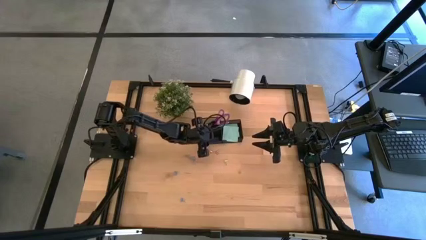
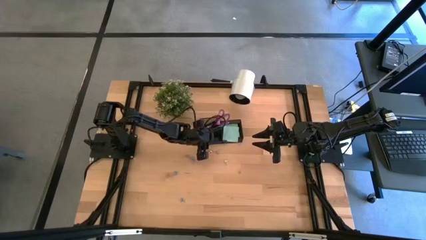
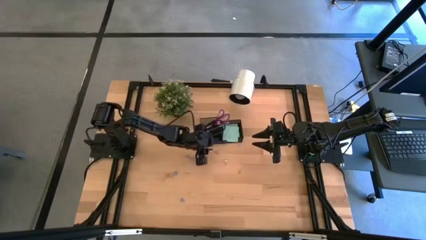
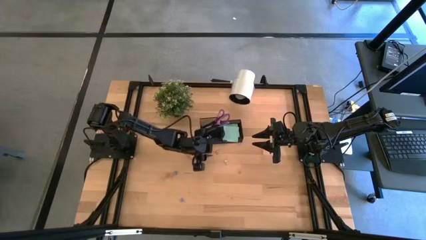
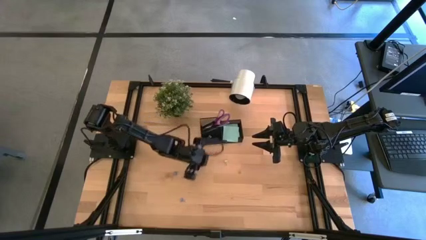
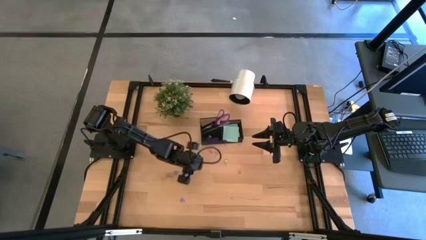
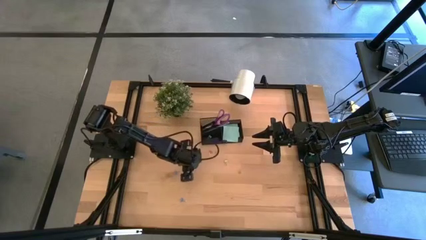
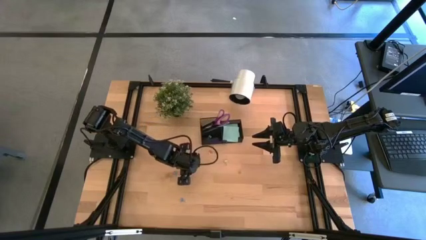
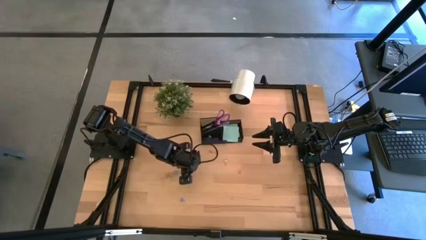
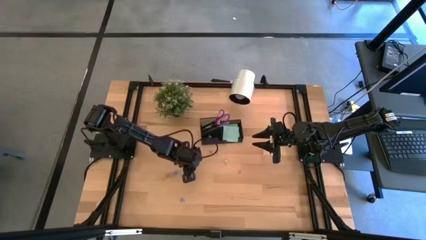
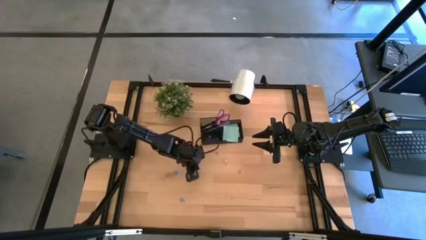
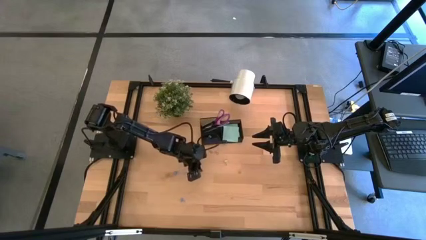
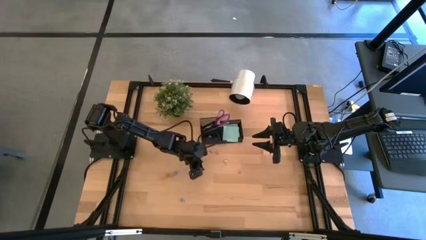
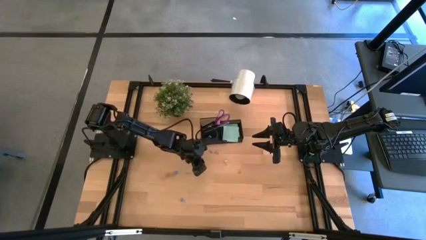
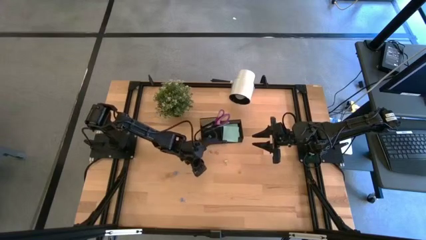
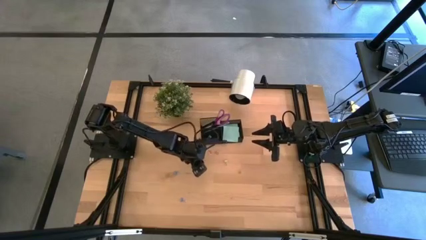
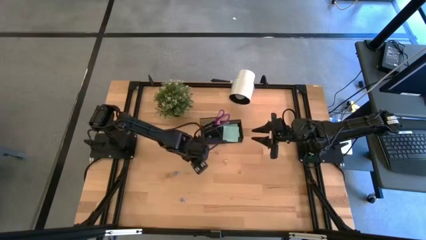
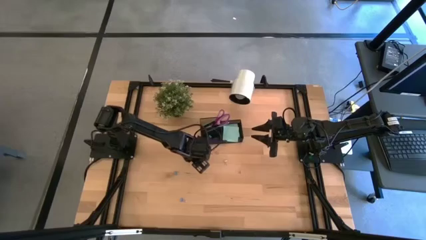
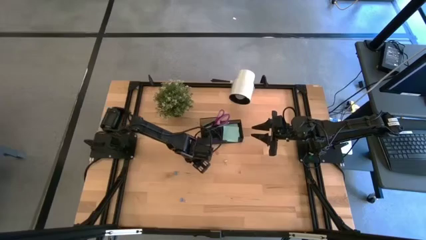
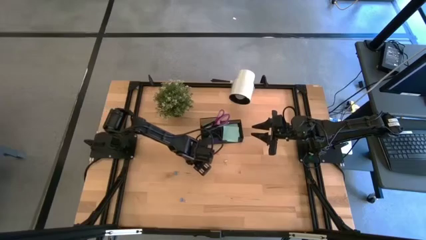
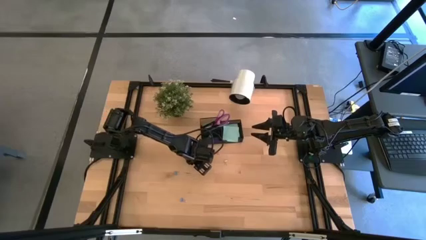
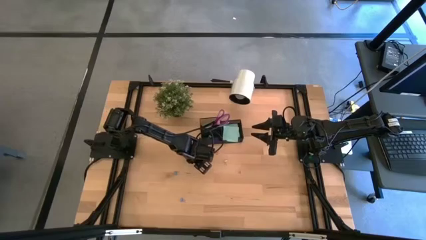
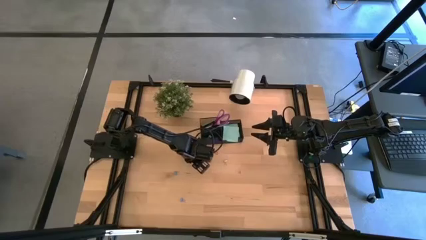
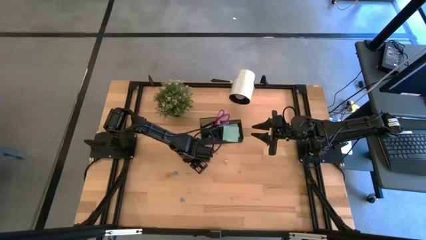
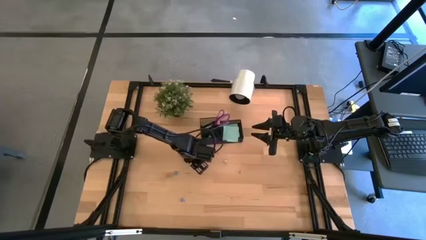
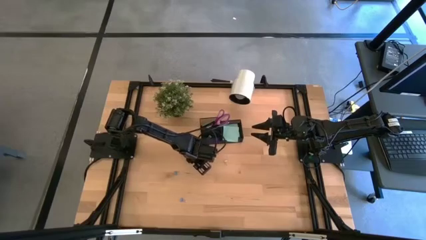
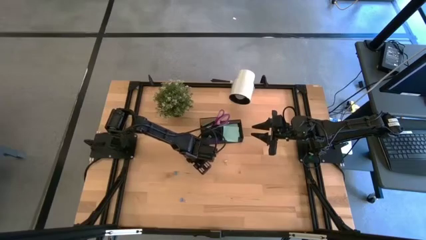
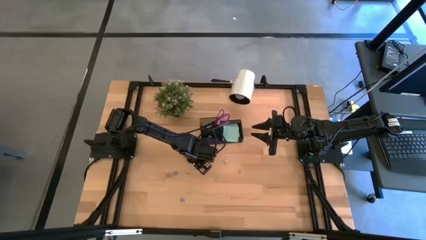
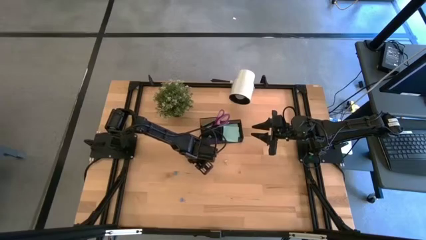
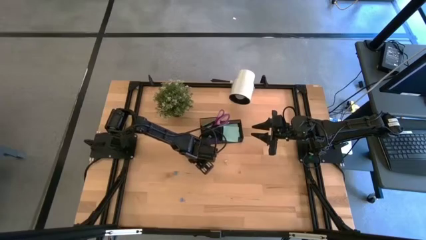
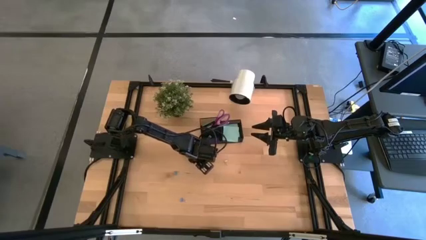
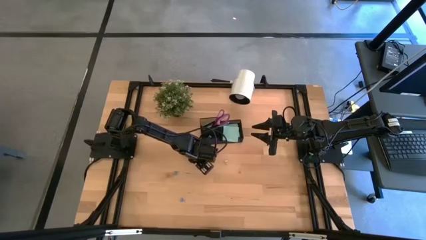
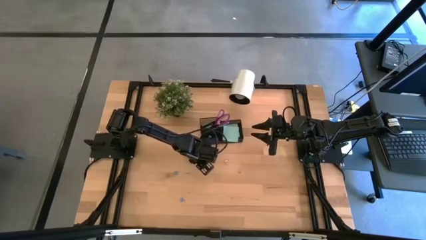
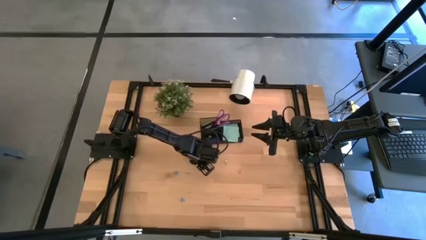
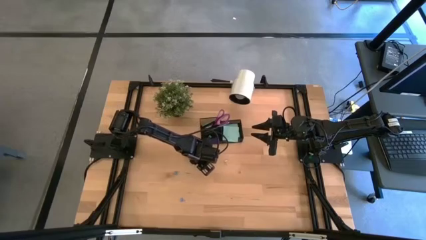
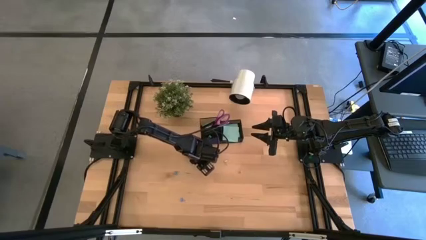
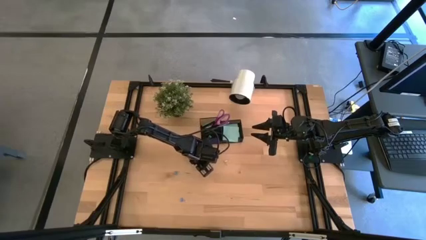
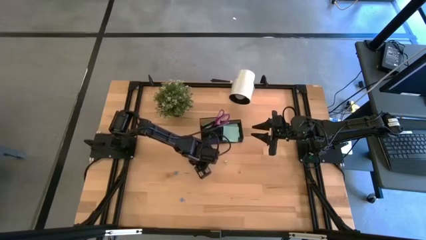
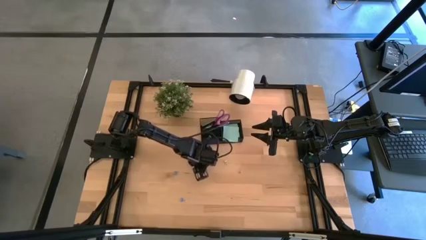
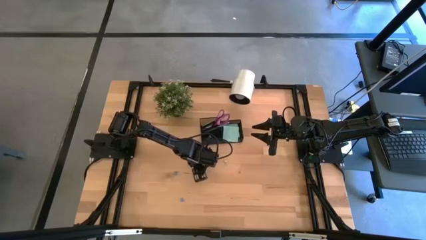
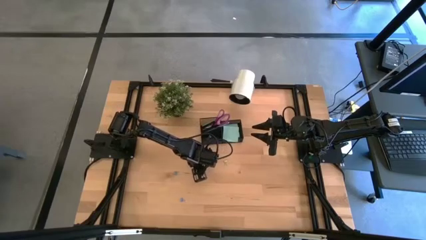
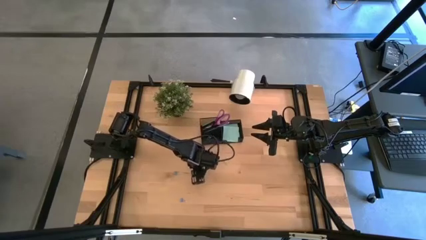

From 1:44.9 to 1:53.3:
Task: Pick and place office supplies into organizer
Put the pink binder clip into the black desk organizer

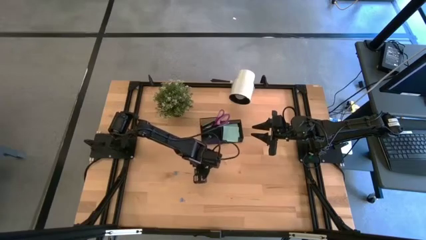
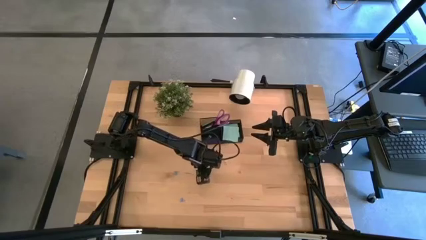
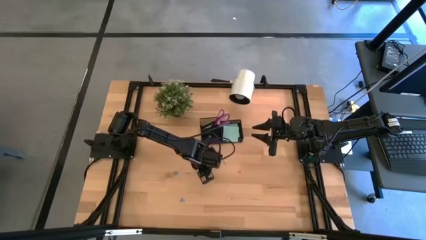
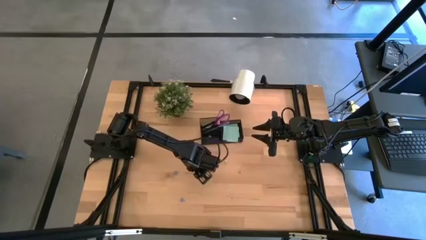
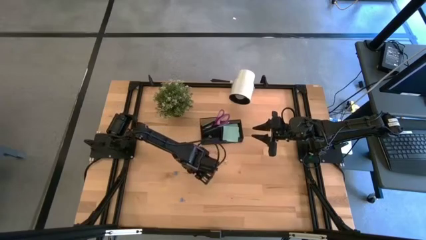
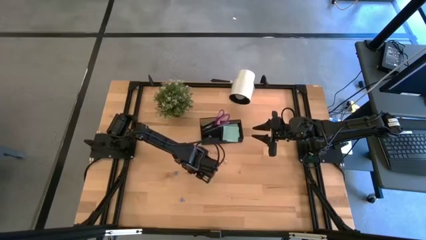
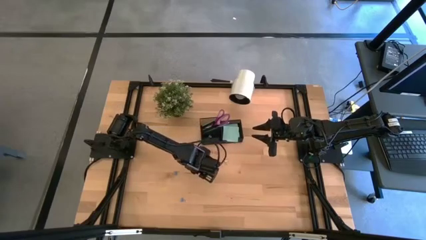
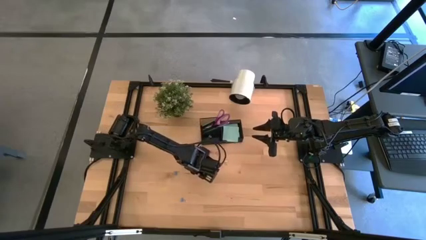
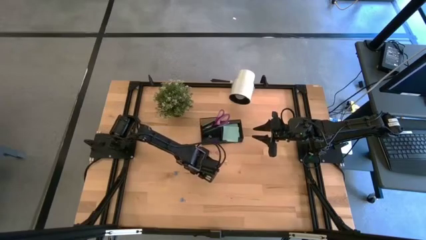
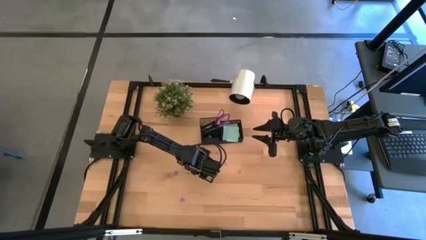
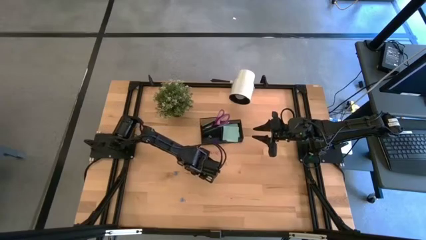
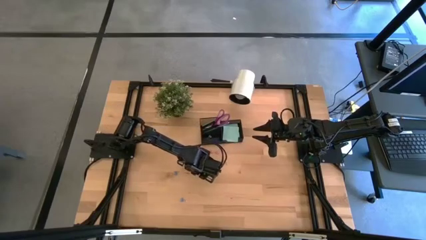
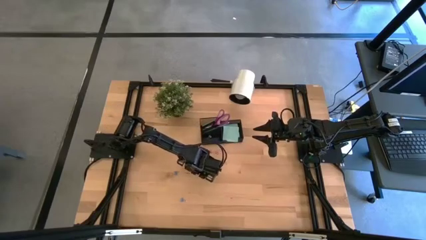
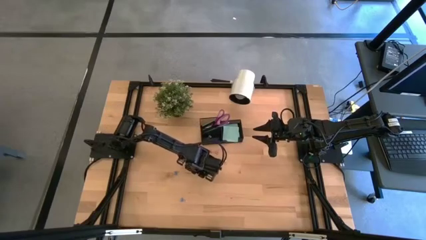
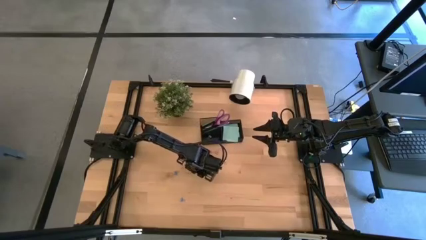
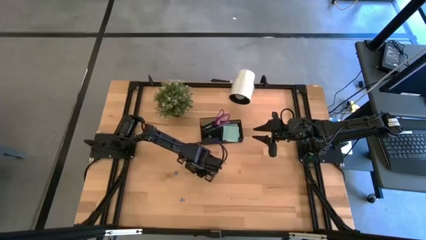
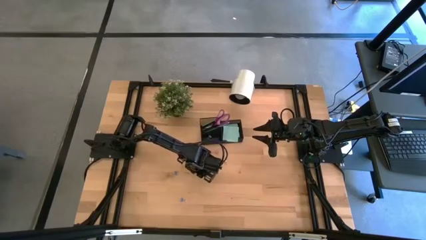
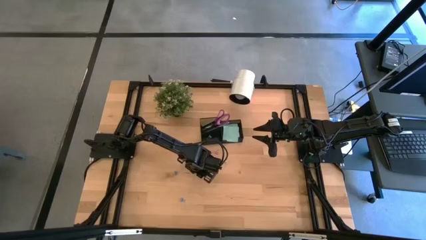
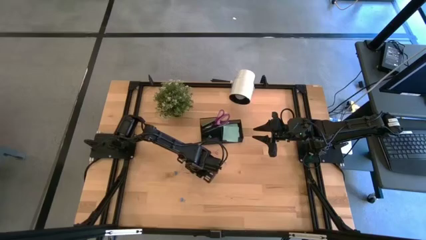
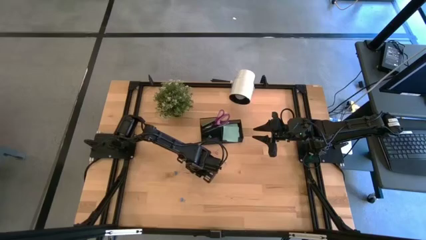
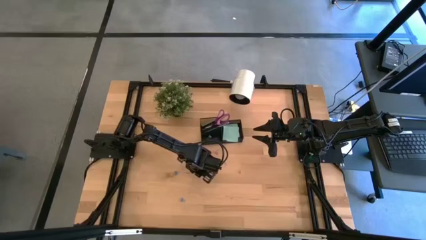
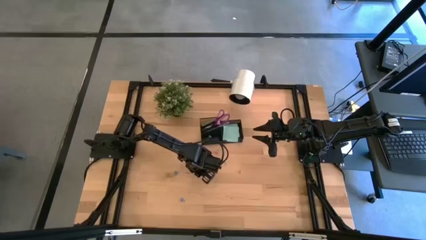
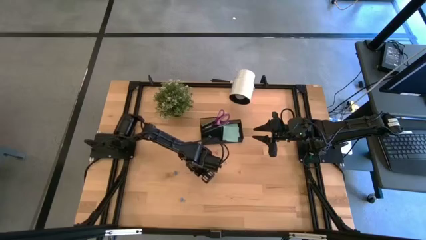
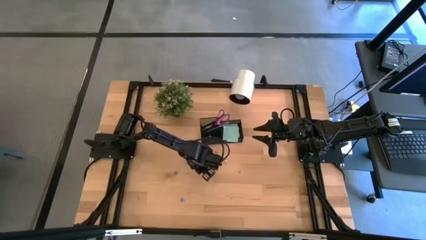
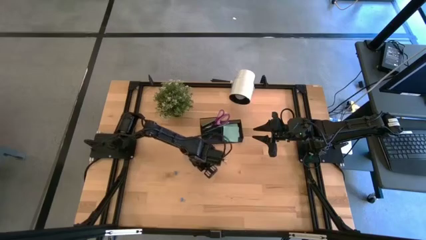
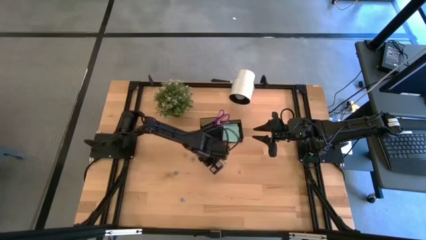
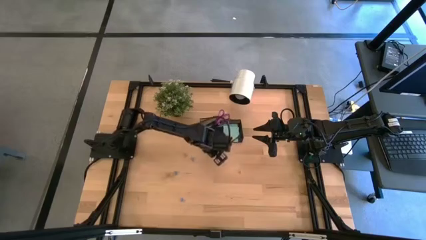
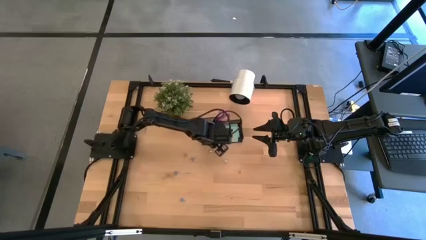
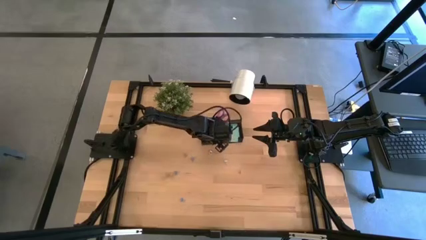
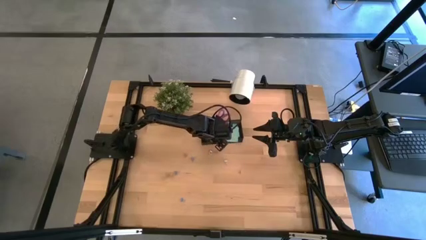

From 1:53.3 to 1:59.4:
Put the pink binder clip into the black desk organizer
